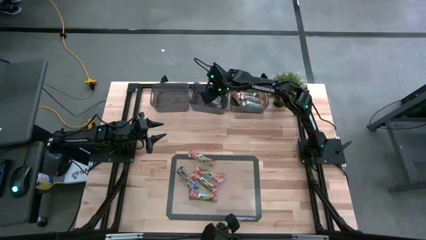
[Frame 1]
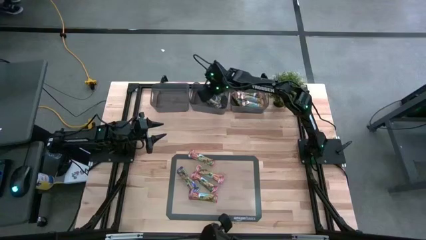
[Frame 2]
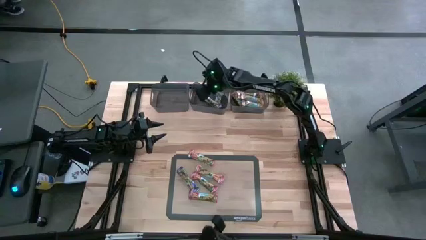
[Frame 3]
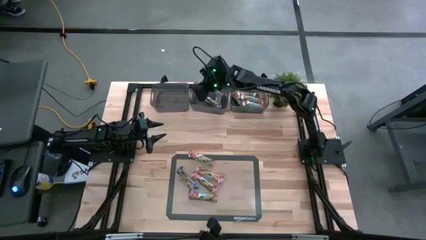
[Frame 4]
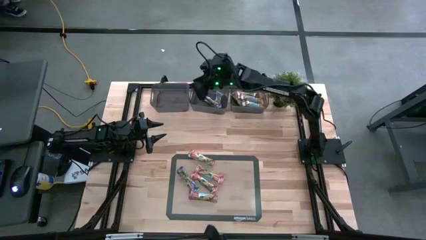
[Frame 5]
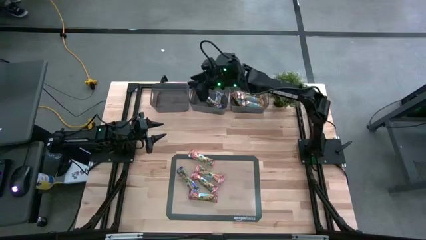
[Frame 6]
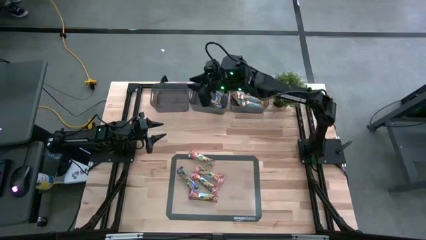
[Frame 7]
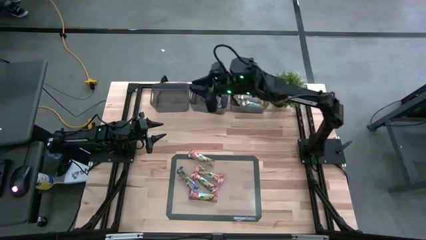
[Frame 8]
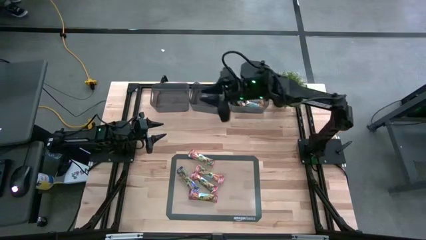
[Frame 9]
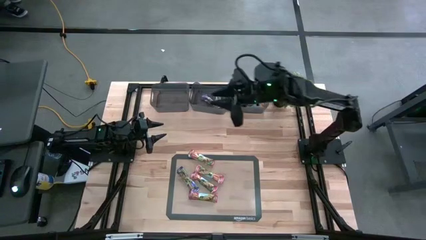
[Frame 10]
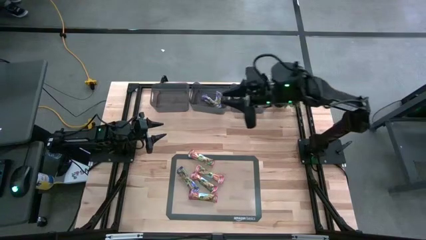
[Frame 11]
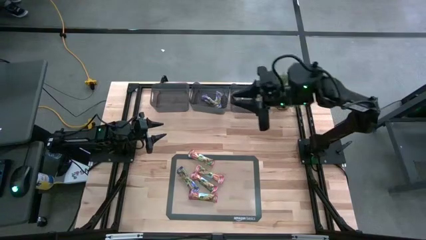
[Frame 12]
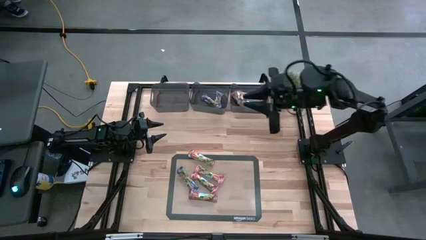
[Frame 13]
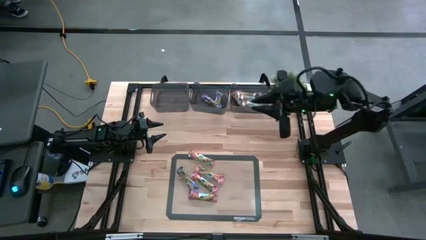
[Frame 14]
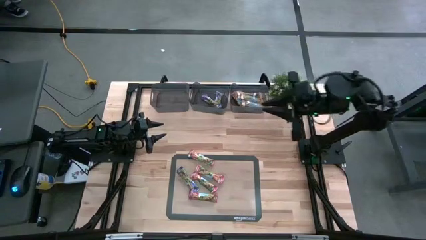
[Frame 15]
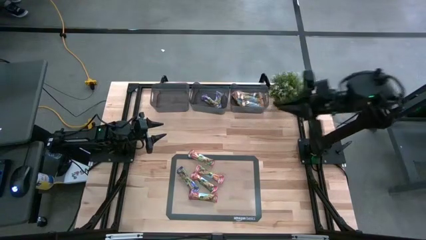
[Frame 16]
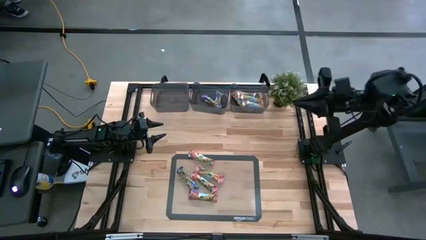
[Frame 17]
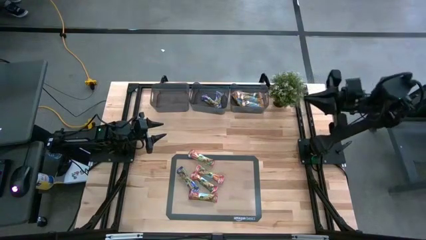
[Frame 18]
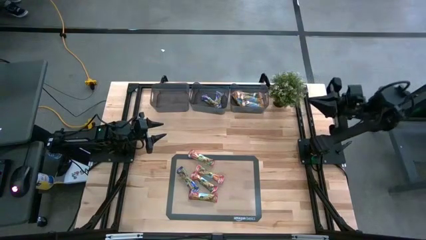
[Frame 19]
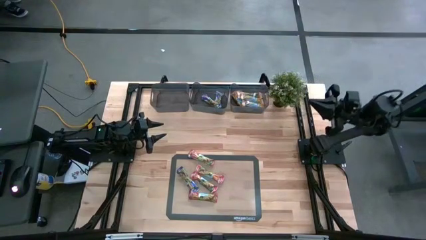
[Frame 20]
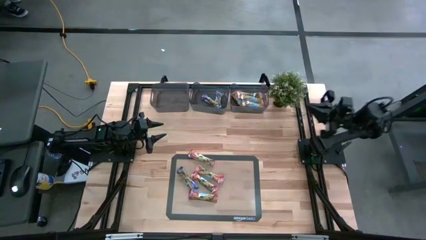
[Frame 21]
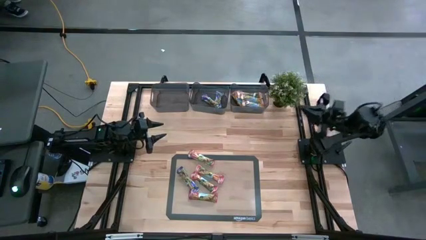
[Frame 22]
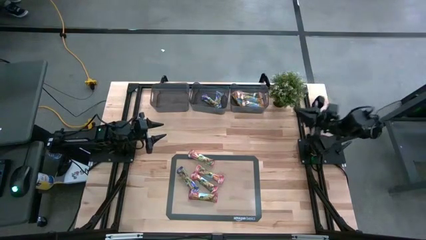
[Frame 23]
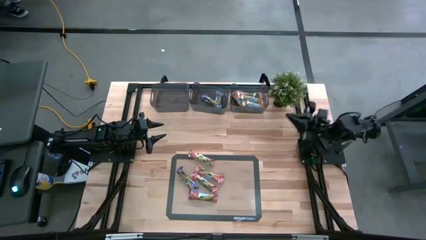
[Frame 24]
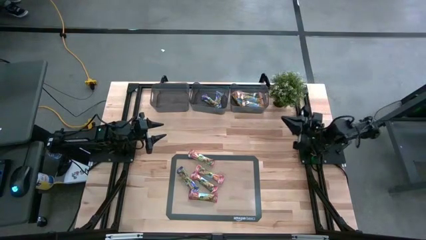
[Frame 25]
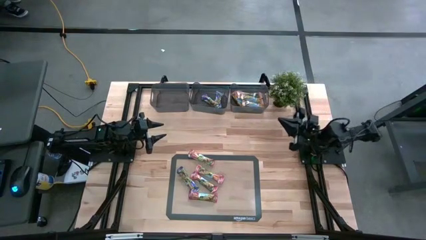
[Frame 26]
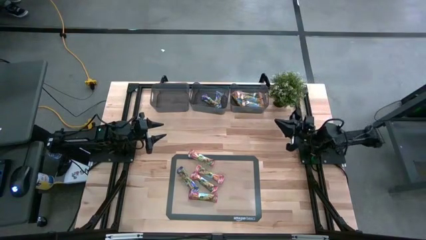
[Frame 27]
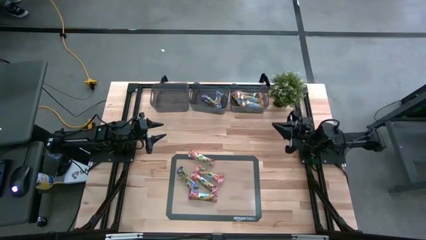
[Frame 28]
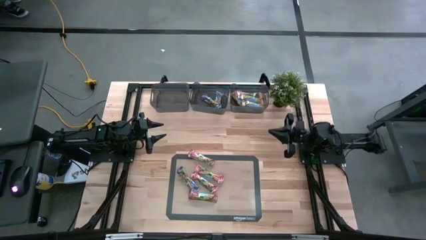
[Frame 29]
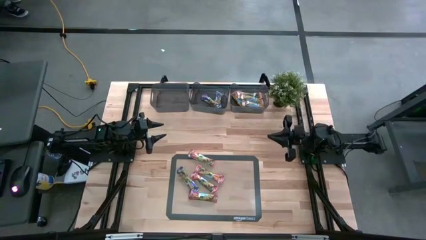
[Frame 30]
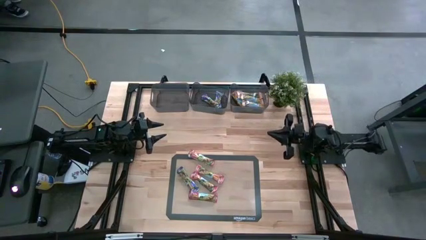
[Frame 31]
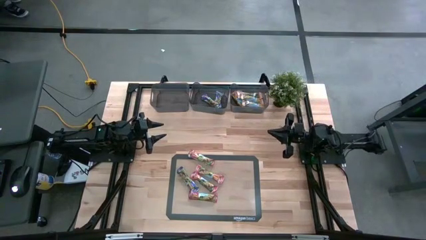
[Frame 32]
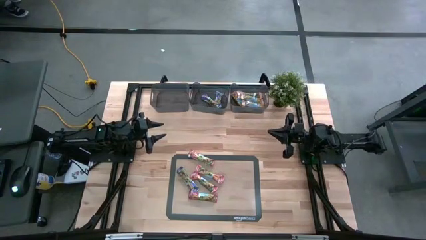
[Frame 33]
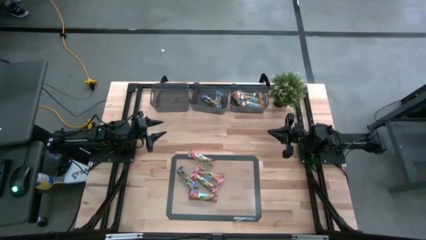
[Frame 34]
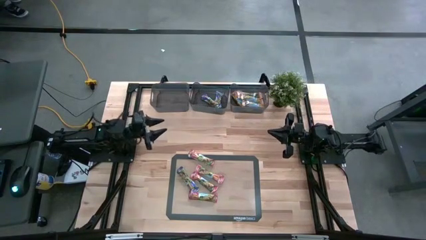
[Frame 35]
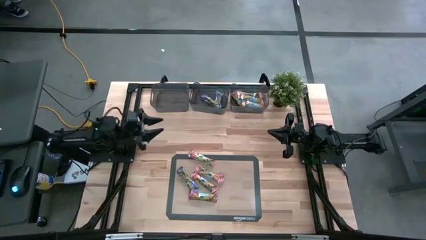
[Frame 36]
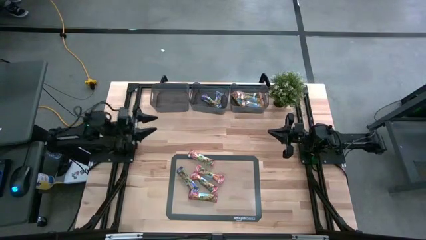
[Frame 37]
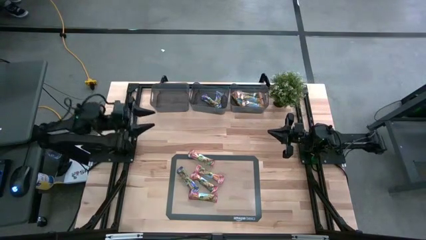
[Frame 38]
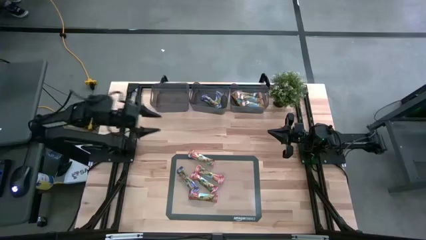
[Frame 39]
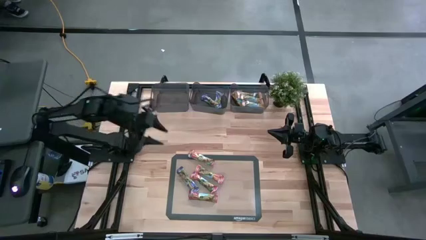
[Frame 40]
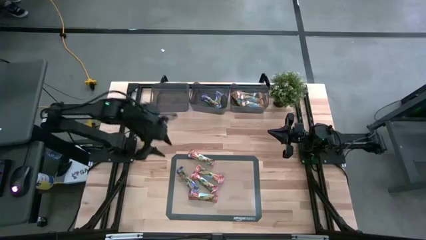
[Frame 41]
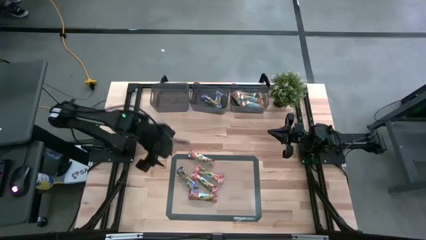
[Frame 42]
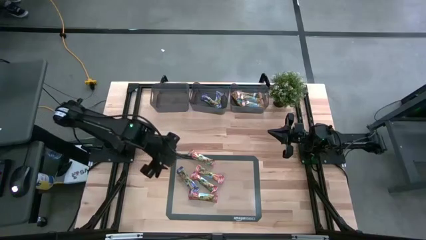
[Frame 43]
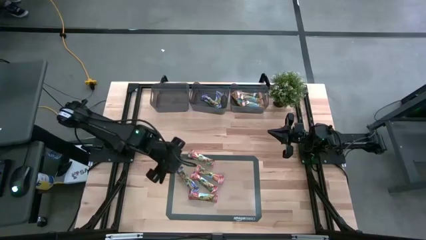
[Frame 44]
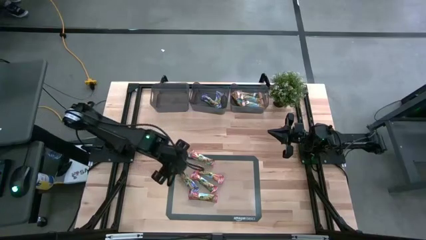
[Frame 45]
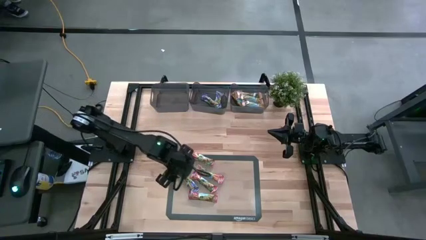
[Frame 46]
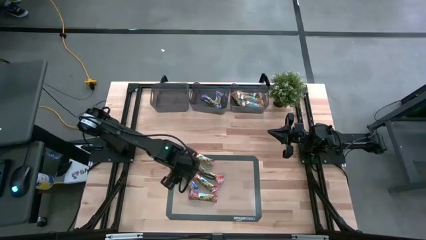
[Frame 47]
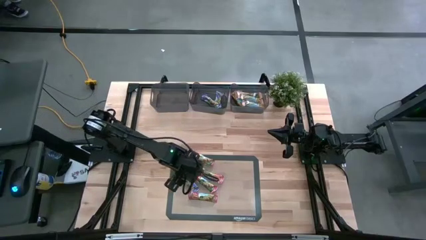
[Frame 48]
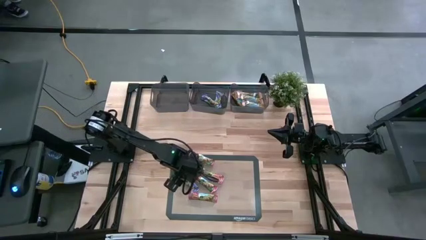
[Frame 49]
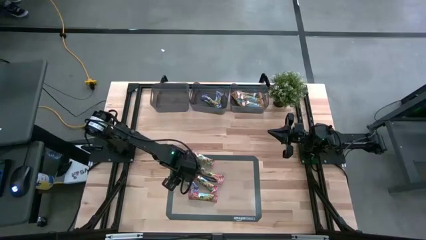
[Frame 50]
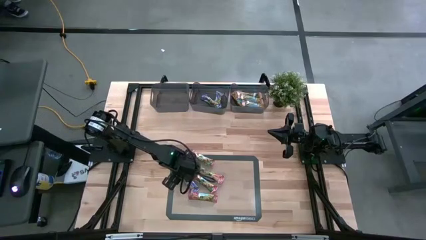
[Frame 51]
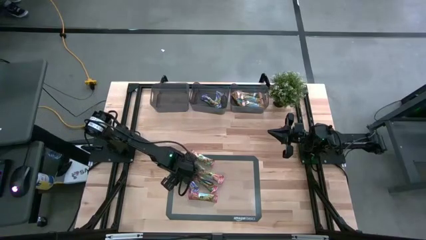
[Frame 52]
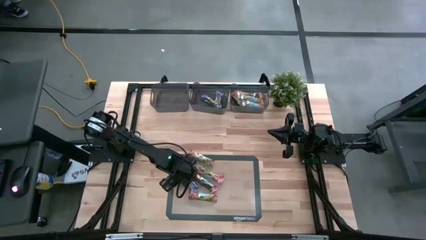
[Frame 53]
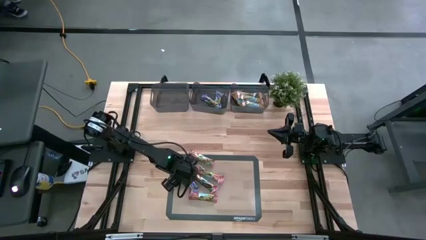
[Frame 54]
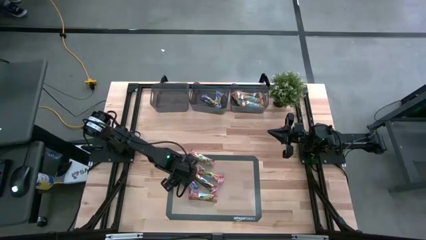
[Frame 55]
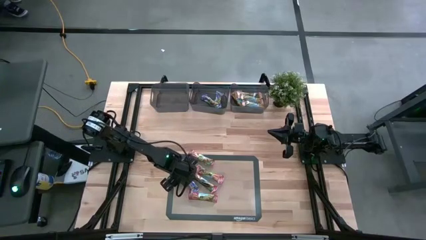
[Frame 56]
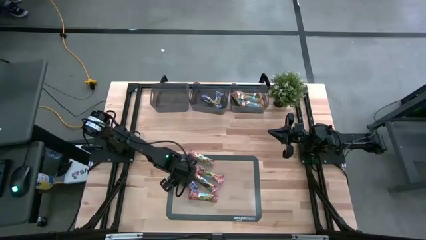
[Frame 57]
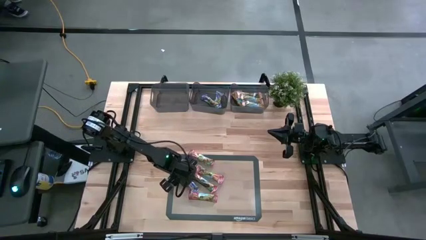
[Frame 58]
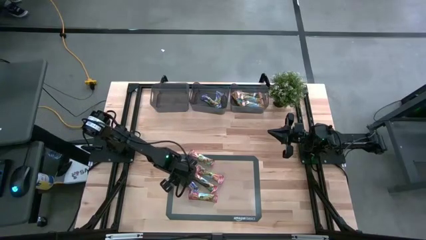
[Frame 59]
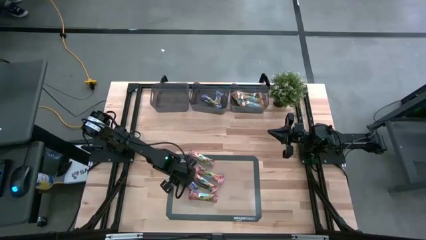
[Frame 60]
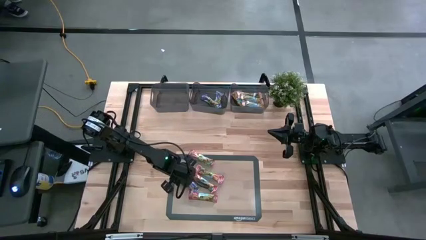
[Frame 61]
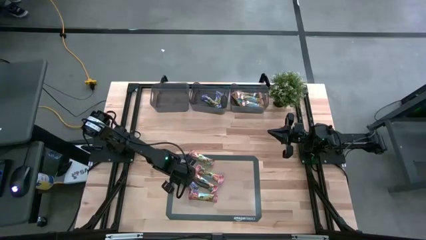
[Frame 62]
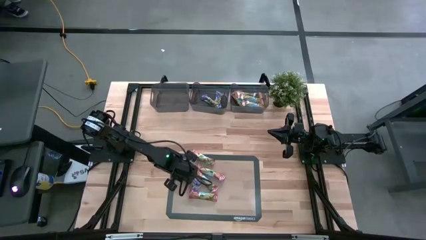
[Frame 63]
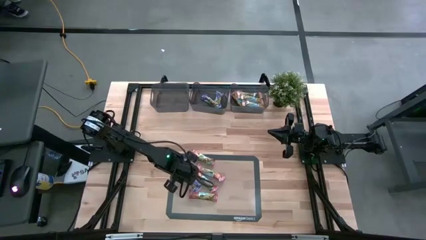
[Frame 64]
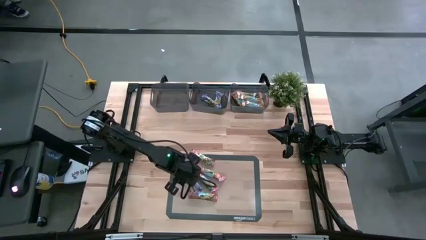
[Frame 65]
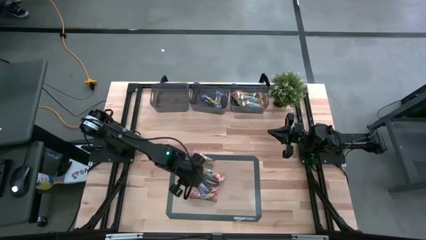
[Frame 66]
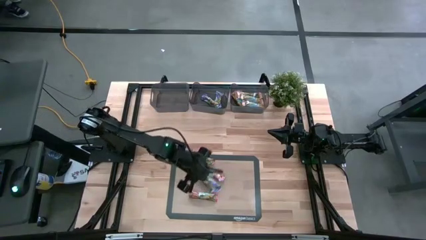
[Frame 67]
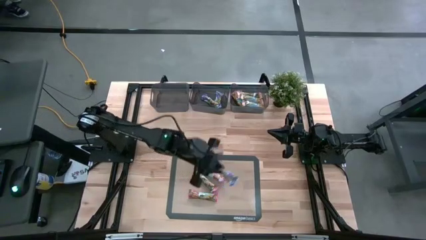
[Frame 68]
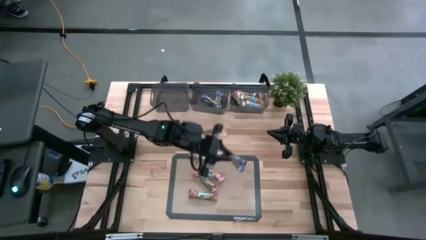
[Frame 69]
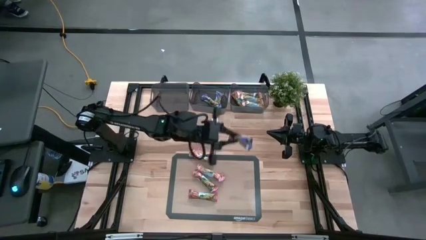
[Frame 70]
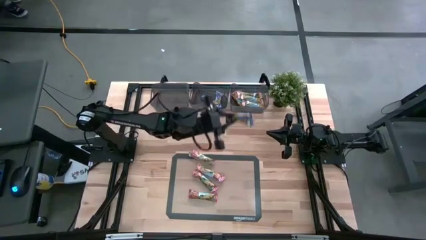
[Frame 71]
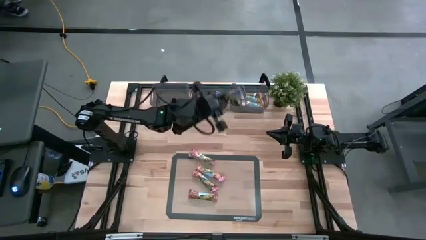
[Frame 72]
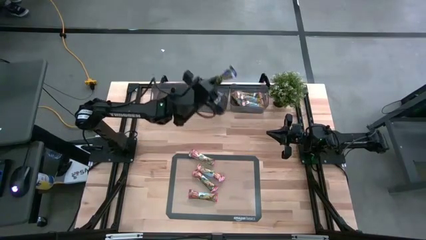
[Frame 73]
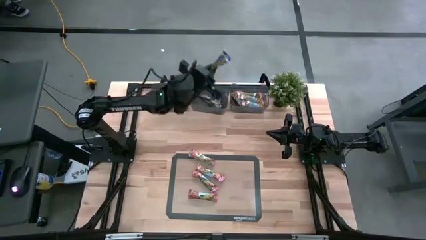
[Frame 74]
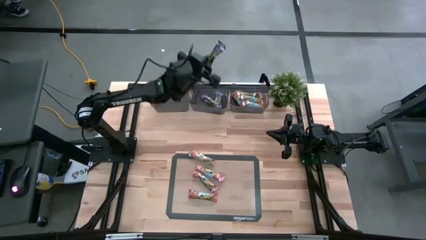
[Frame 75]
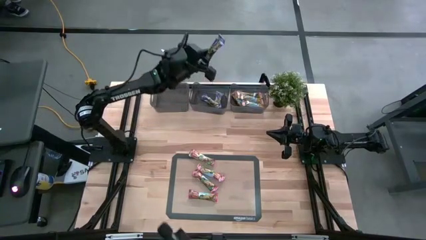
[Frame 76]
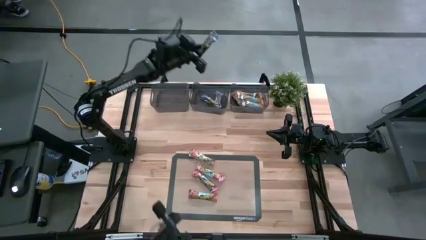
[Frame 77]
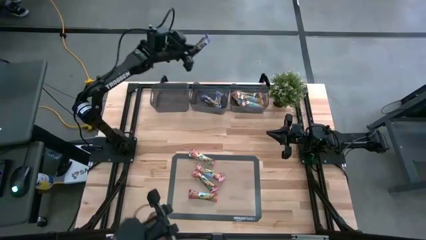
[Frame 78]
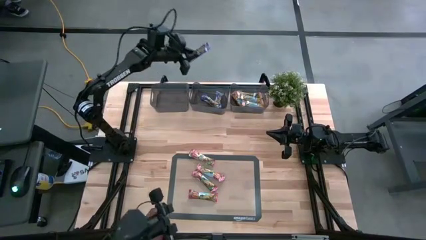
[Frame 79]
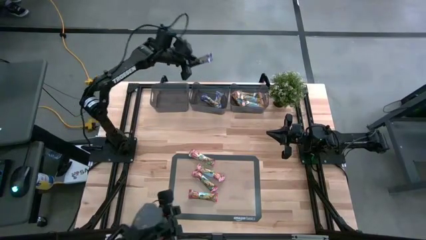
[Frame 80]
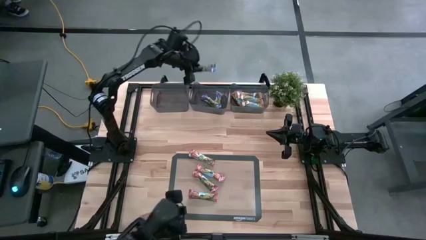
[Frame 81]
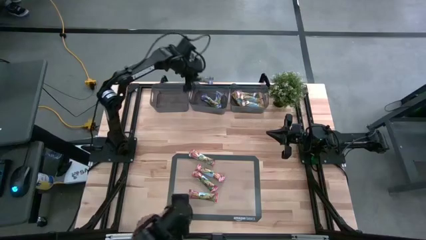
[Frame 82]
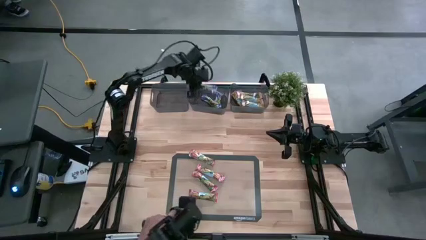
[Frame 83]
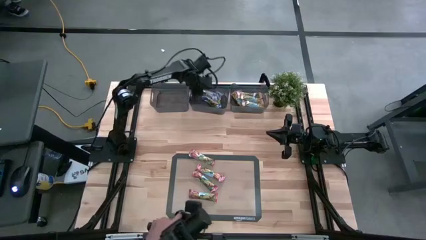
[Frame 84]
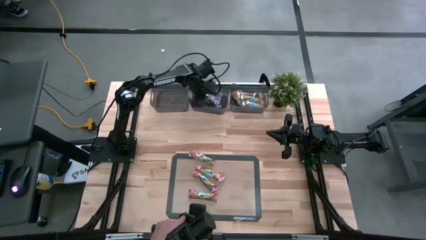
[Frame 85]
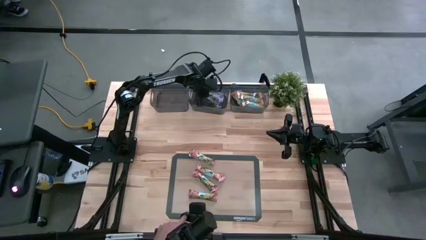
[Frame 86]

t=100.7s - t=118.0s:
Task: Pick and place Granola Bars by type
Put the blue granola bar into the middle black bin
